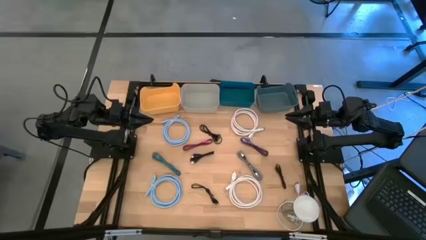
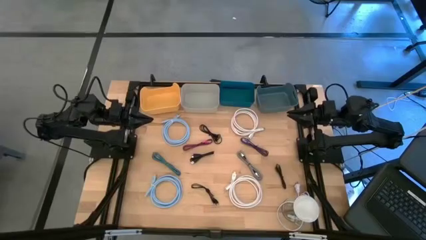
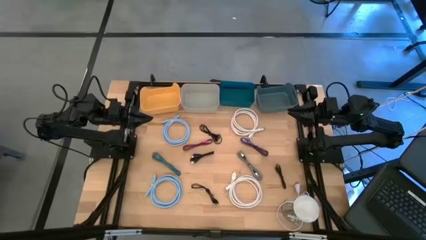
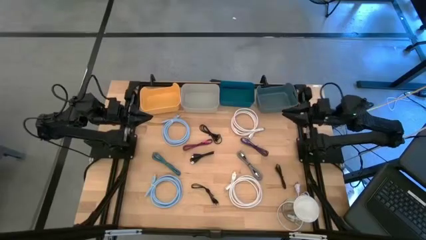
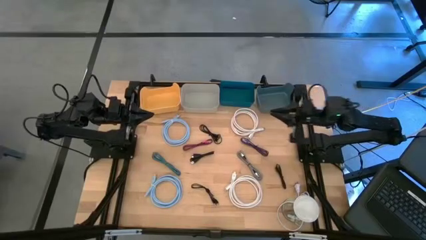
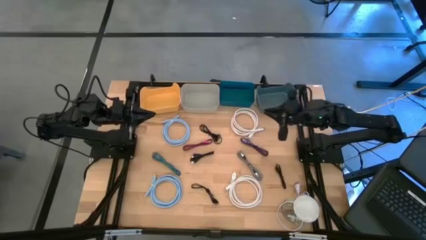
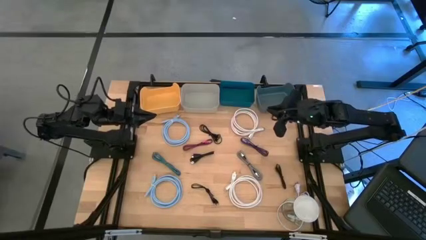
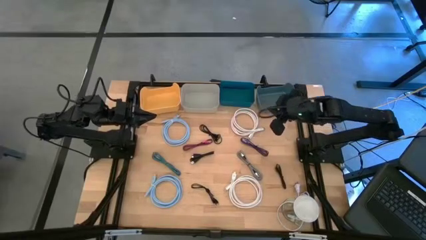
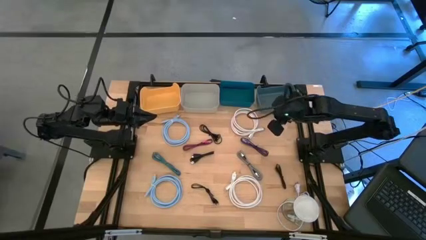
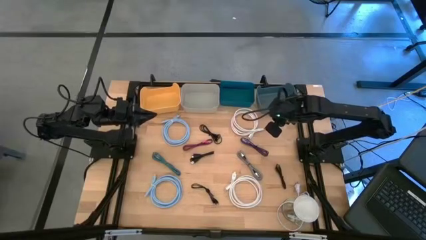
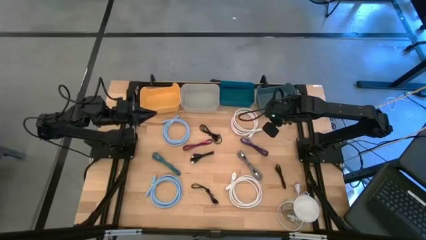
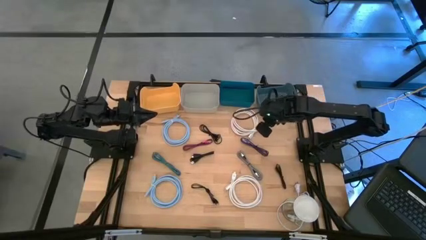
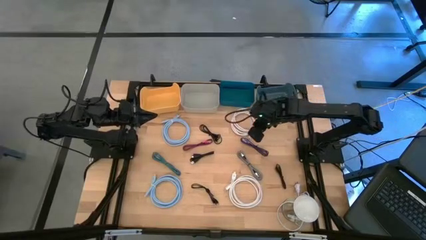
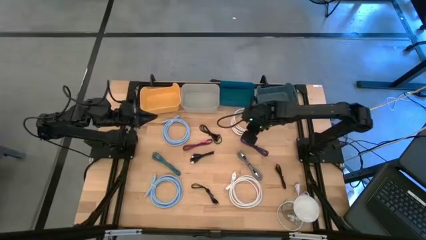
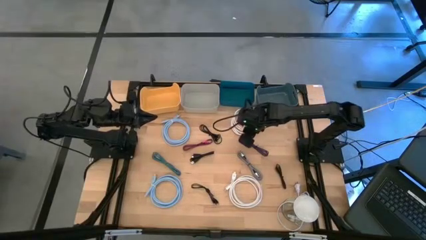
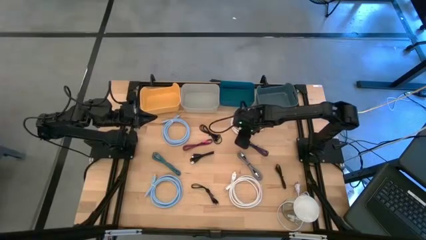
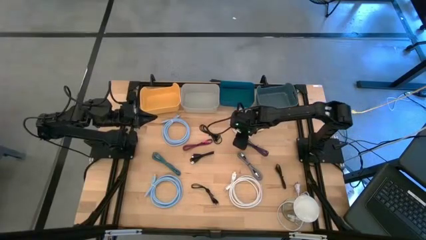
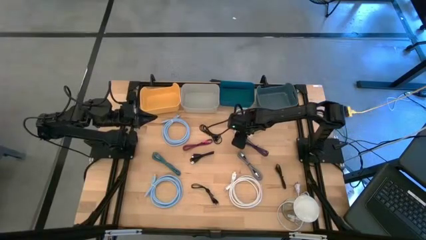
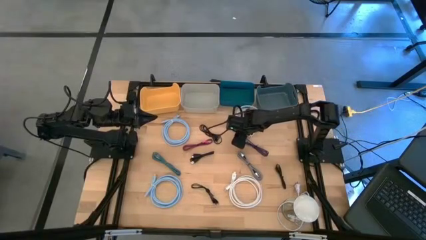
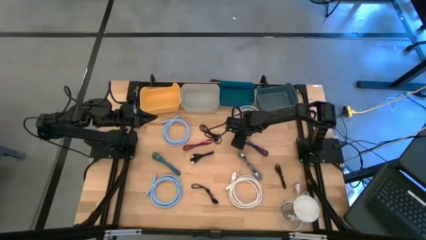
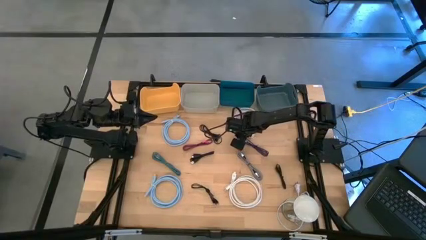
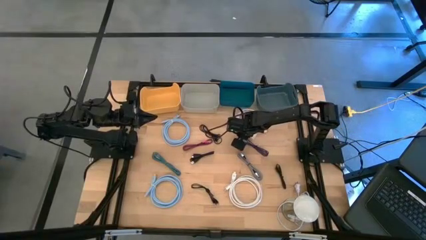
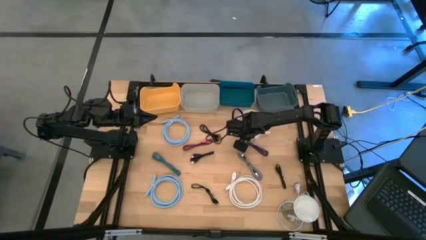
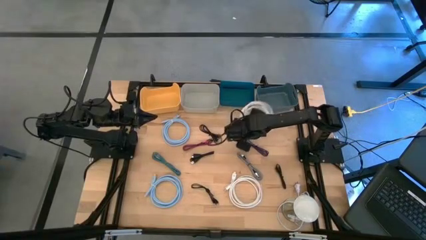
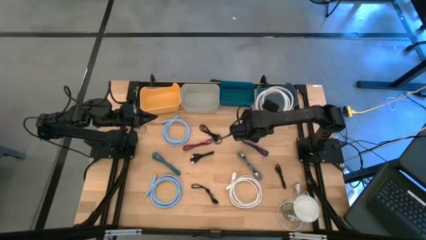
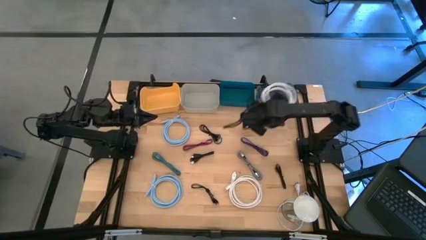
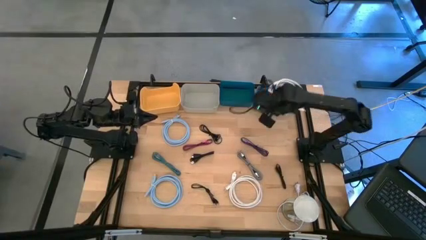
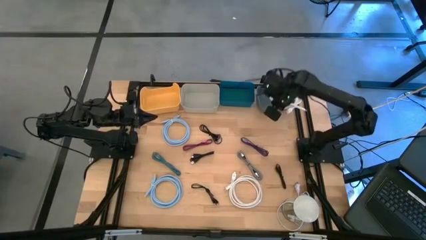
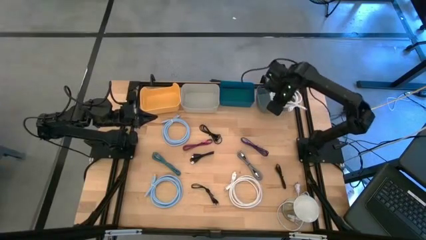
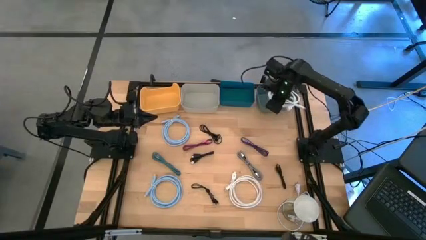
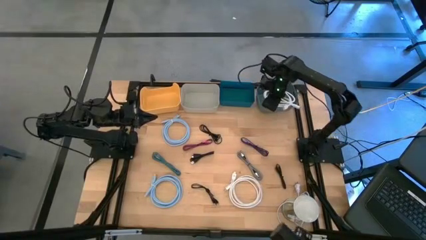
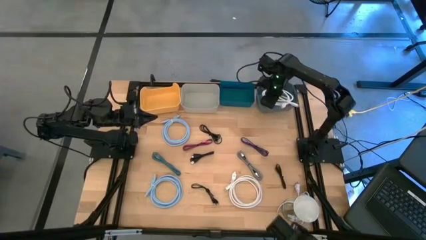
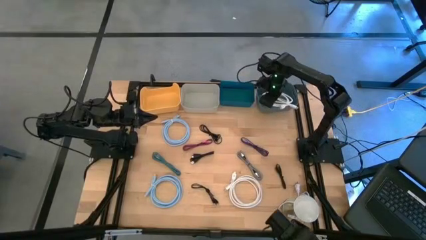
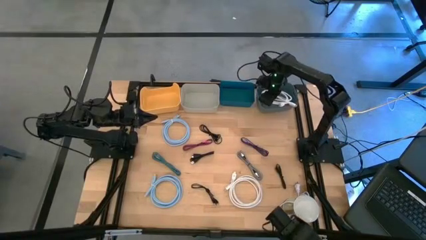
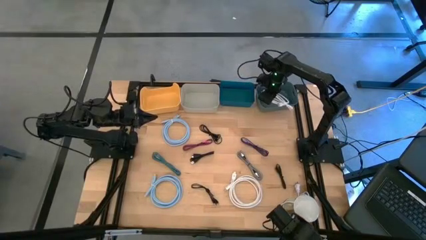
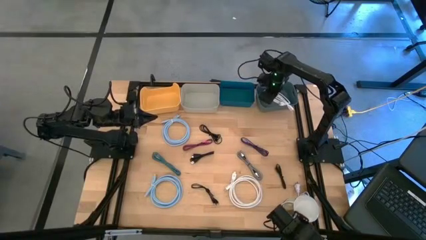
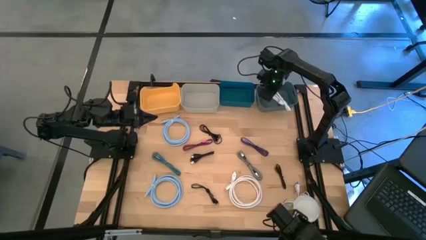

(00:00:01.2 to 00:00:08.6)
Task: Pick & Place USB Port
Put the white HDMI cable into the blue bin

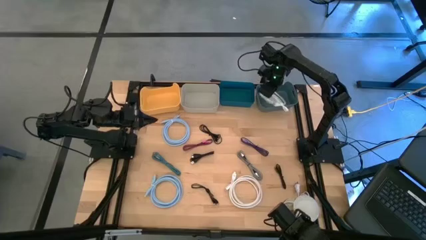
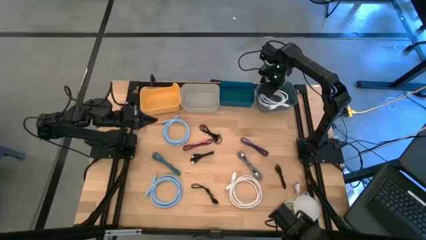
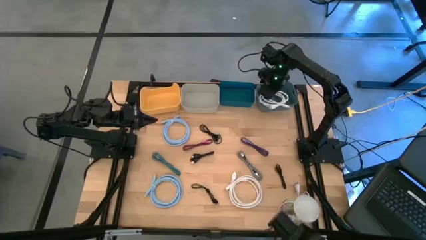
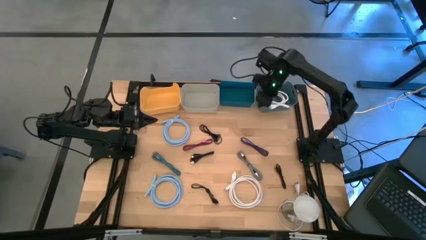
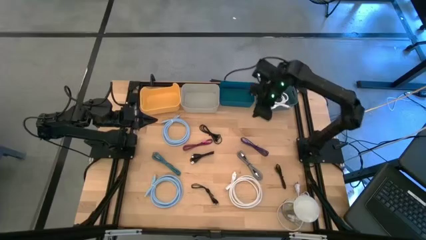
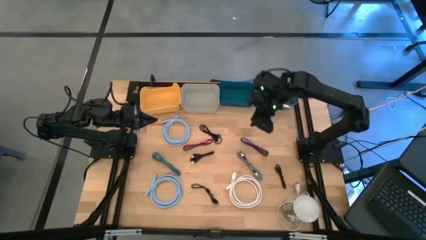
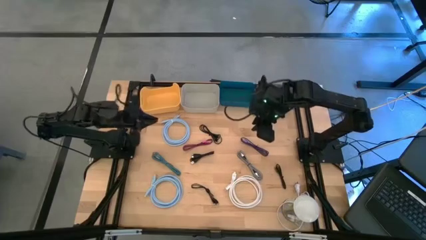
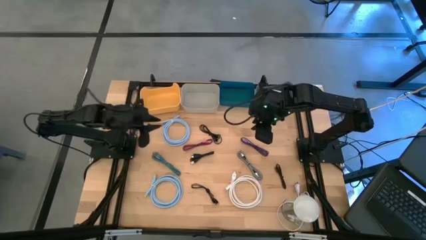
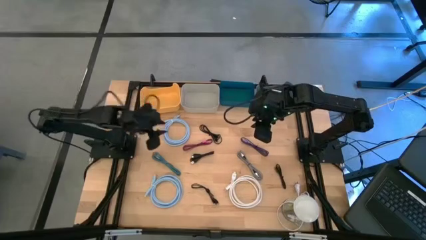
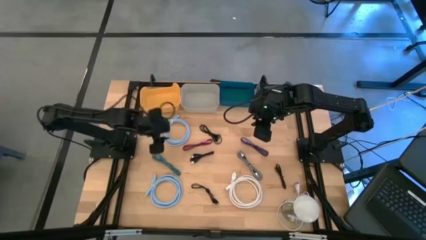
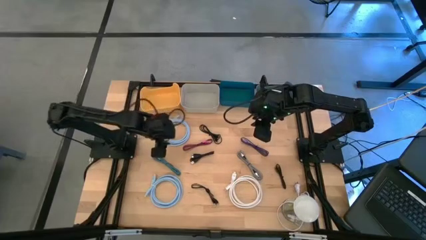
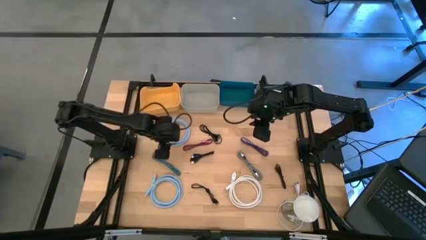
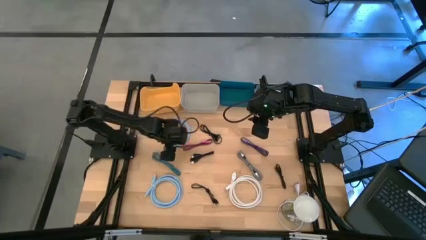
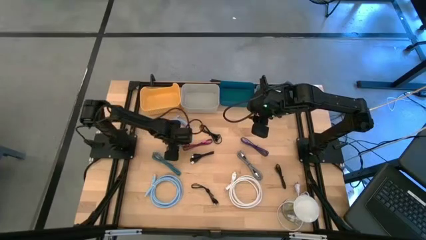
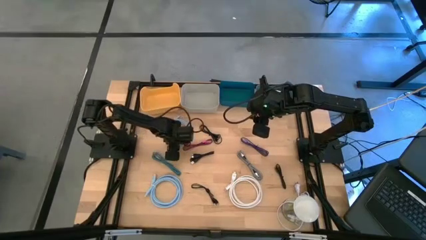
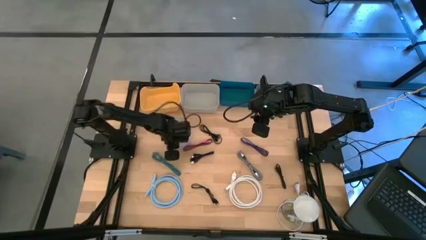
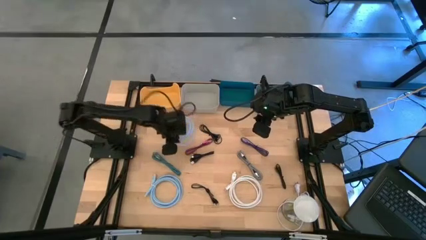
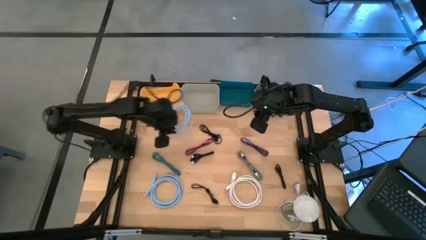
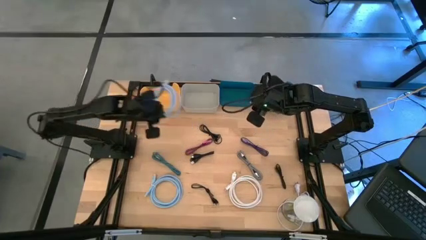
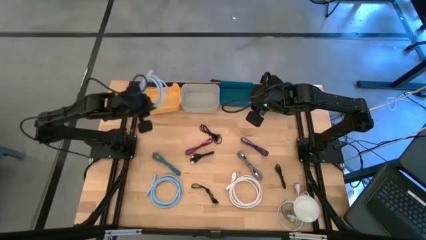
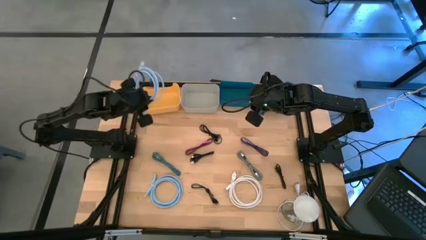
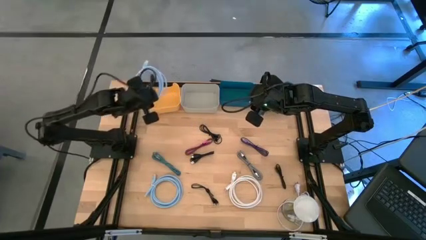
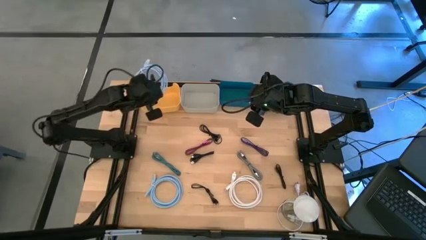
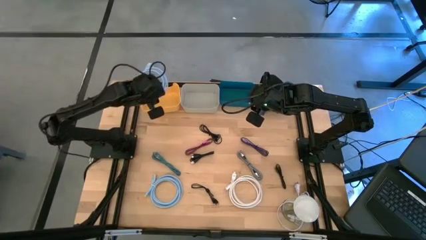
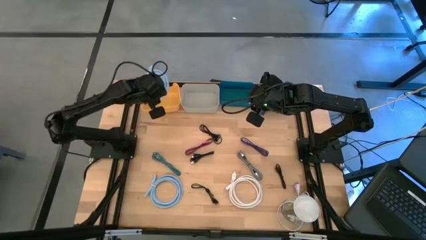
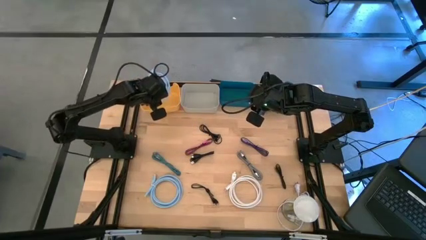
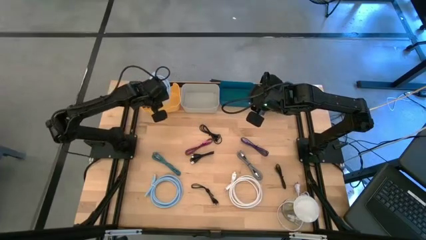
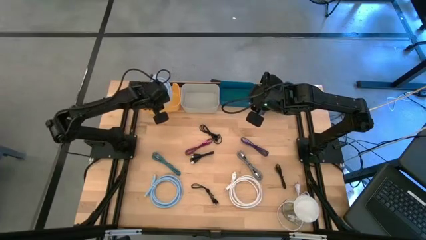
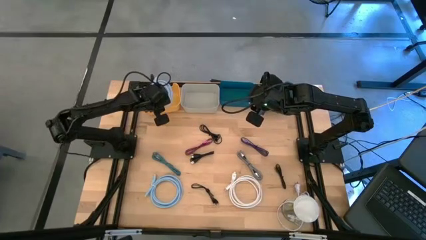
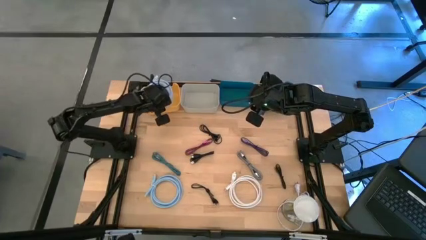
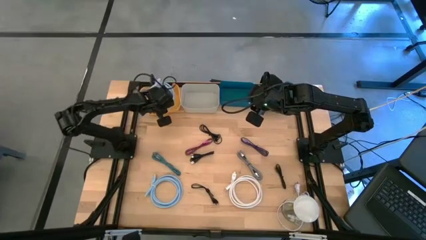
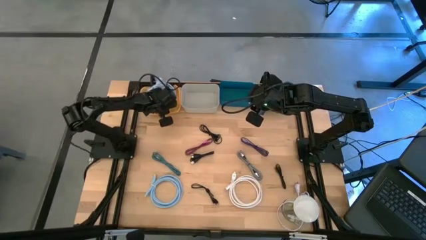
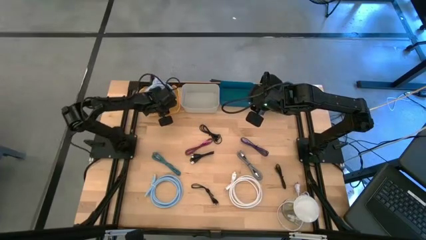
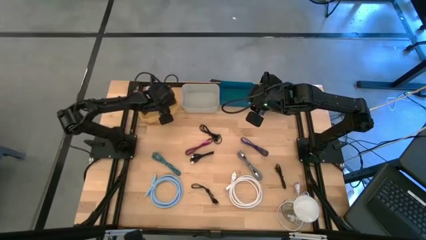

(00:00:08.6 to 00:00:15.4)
Put the blue HDMI cable into the yellow bin

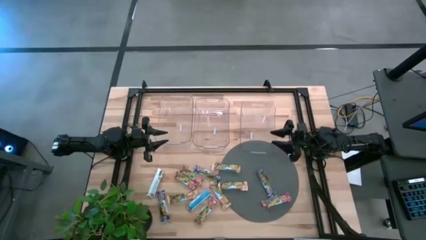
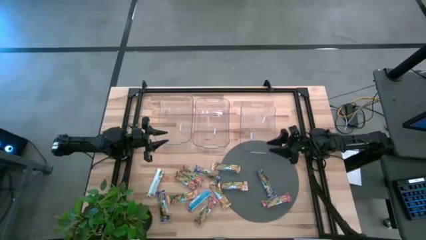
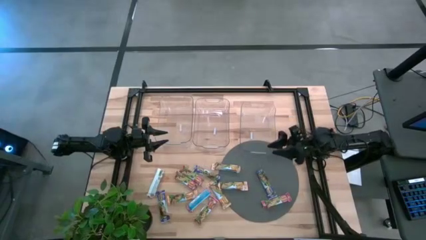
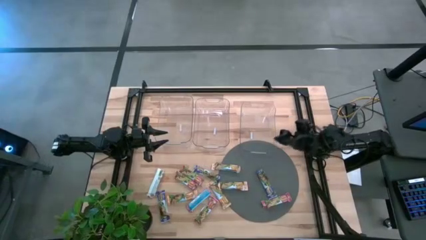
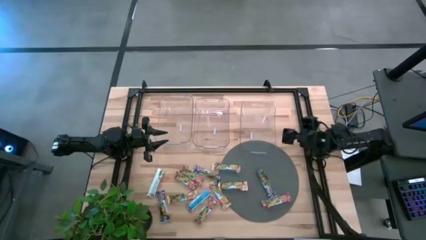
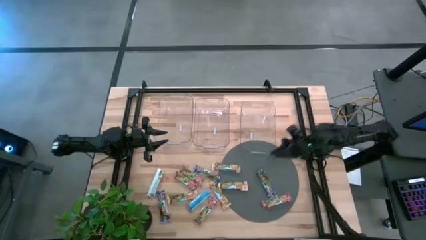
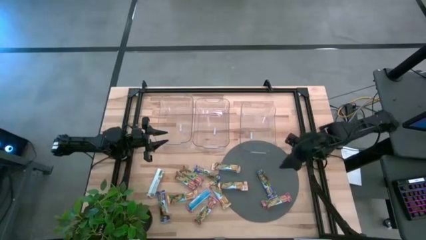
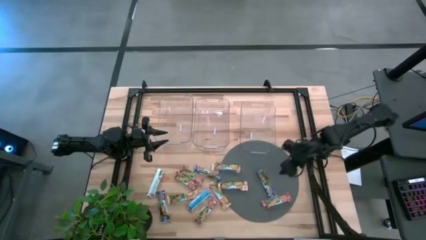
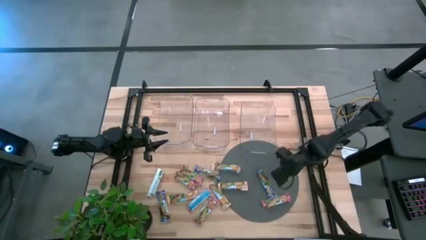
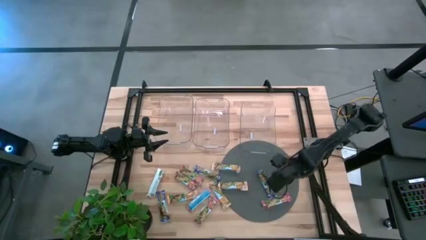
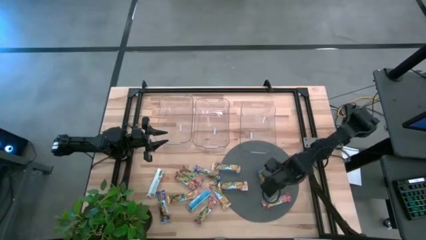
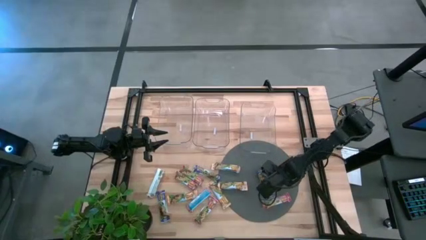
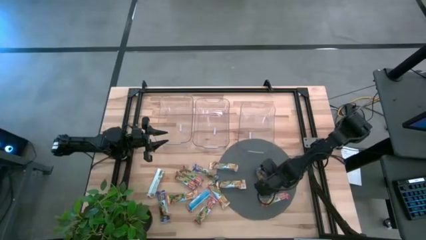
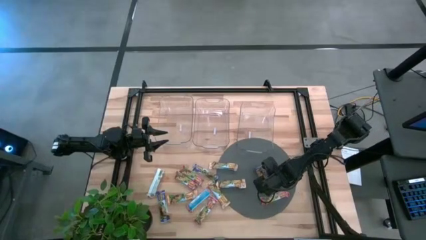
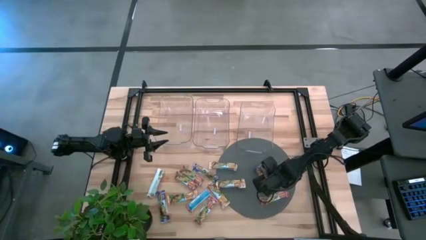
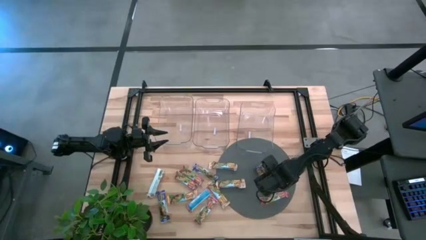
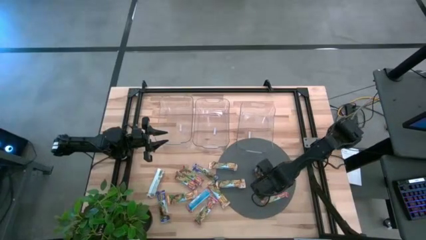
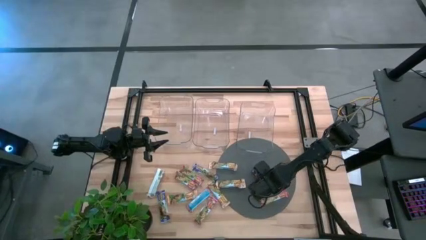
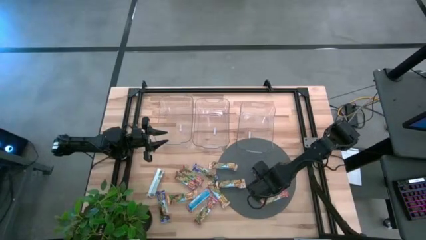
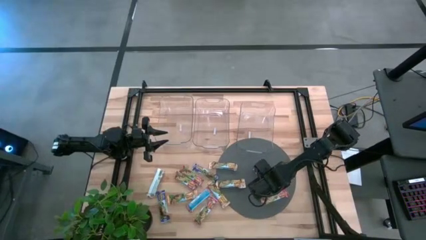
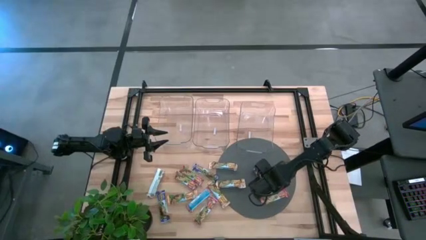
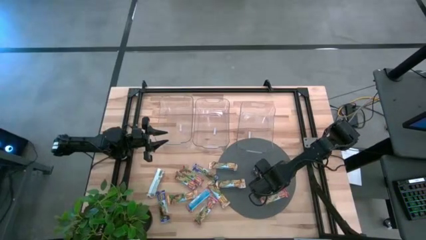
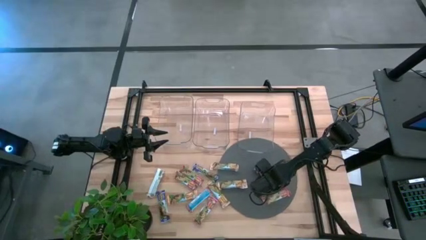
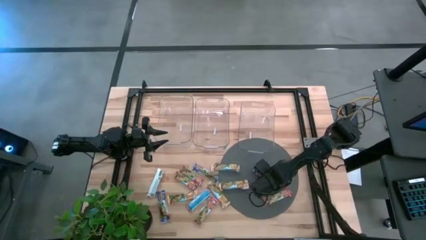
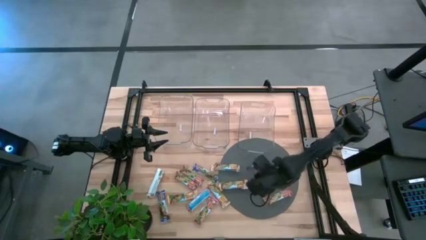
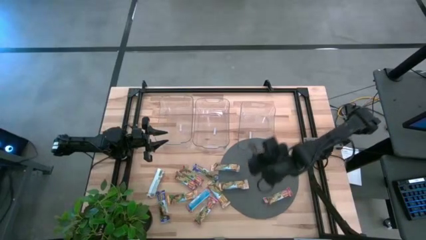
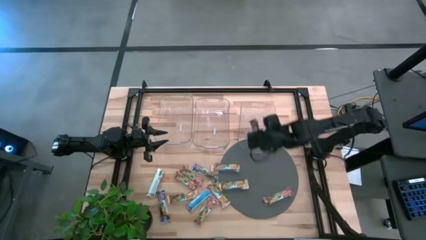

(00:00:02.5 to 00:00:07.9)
Task: Pick and place Granola Bars by type
Put the blue granola bar into the right transparent bin
